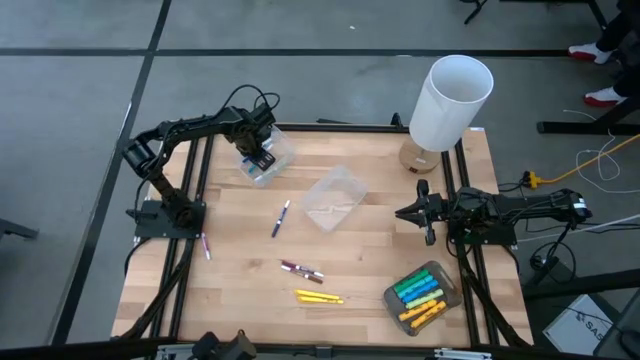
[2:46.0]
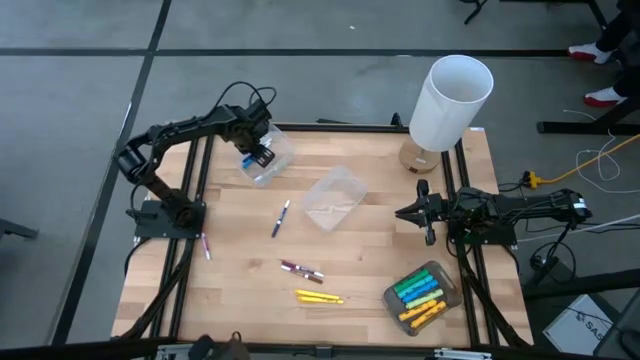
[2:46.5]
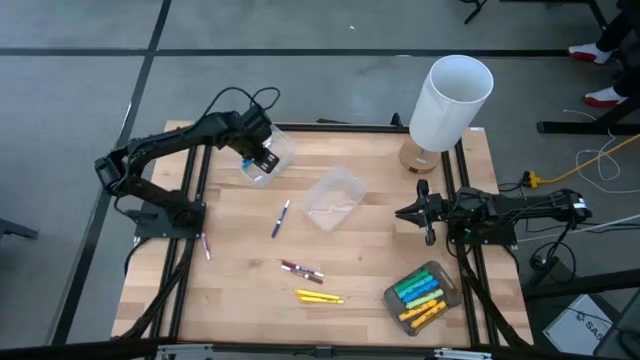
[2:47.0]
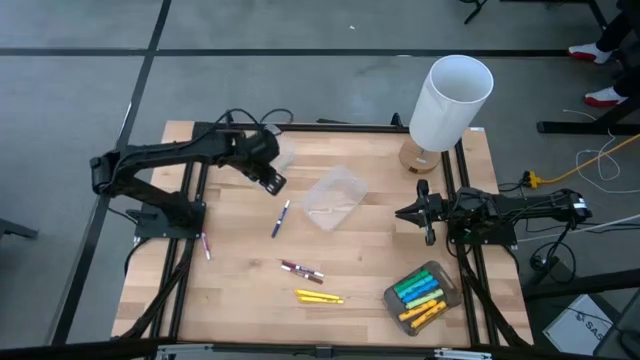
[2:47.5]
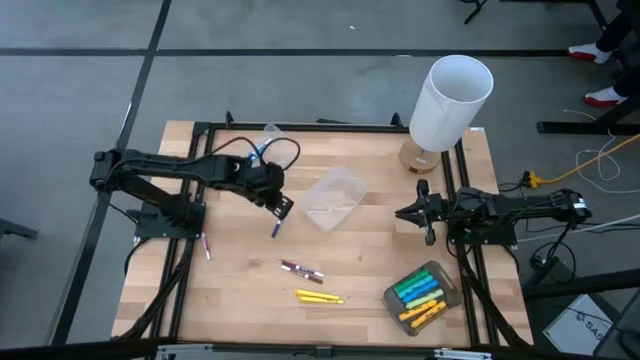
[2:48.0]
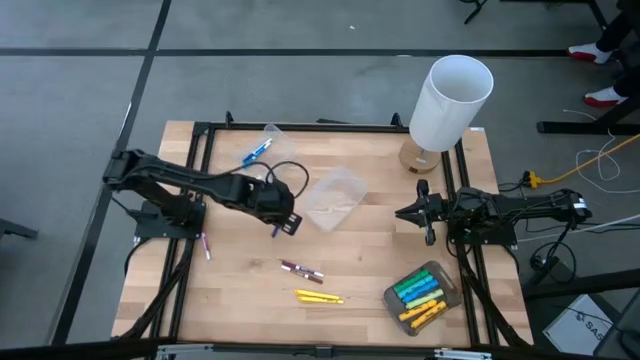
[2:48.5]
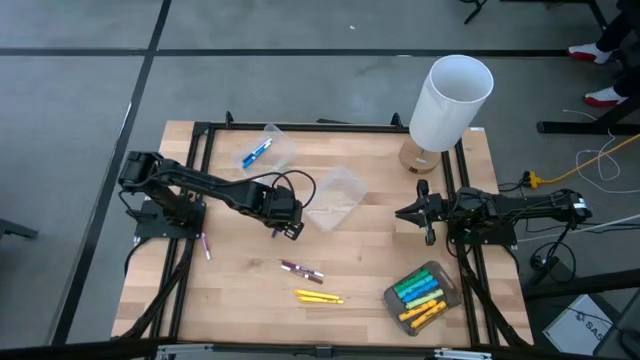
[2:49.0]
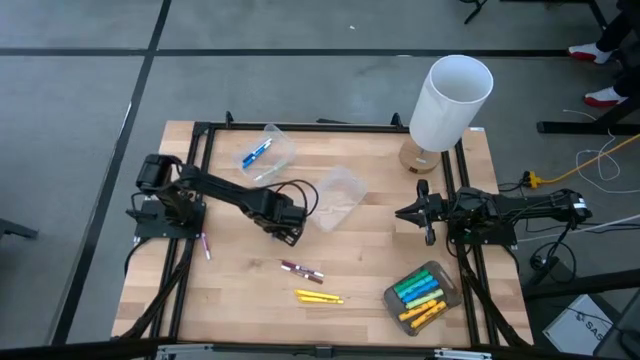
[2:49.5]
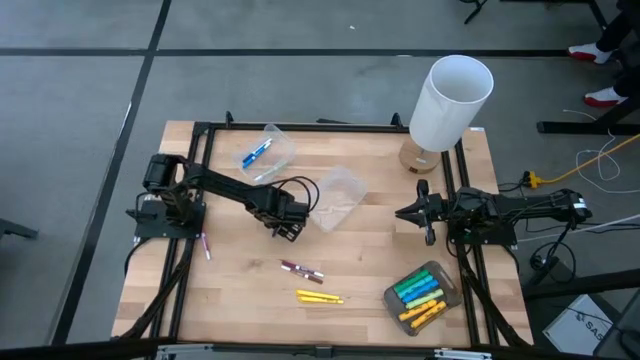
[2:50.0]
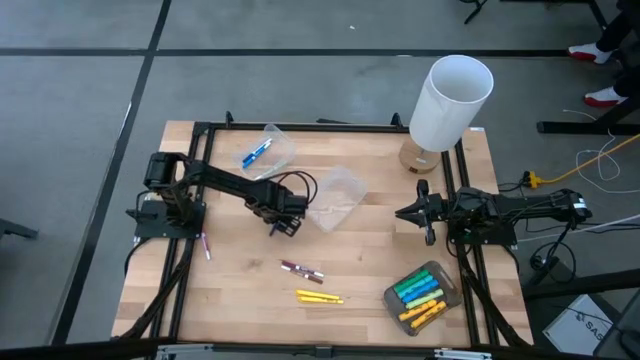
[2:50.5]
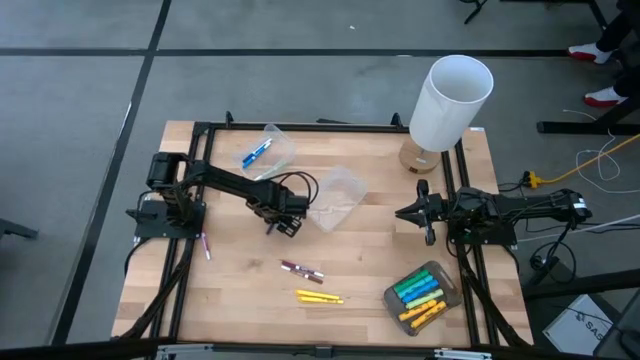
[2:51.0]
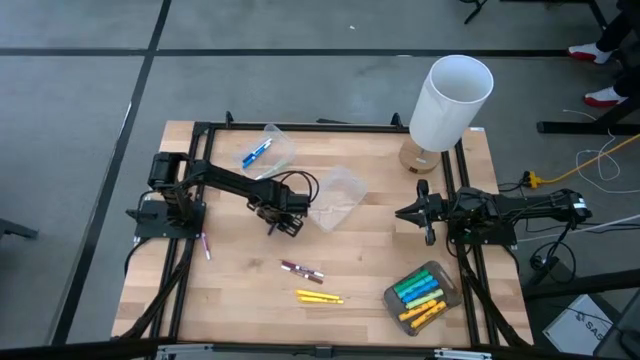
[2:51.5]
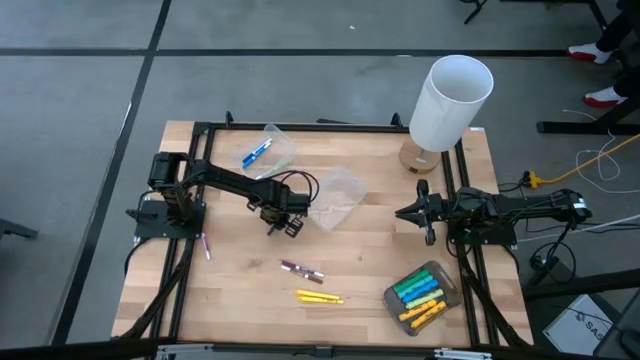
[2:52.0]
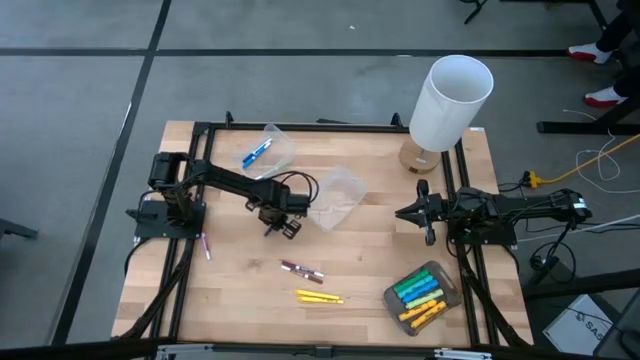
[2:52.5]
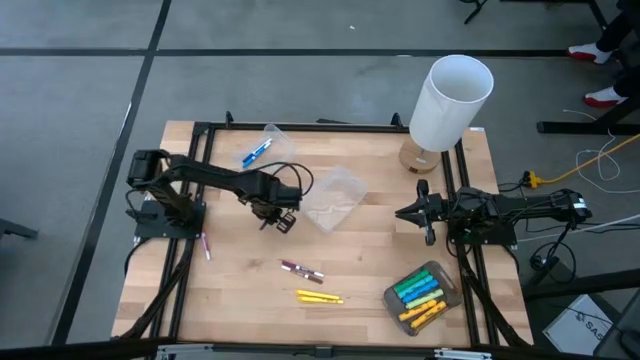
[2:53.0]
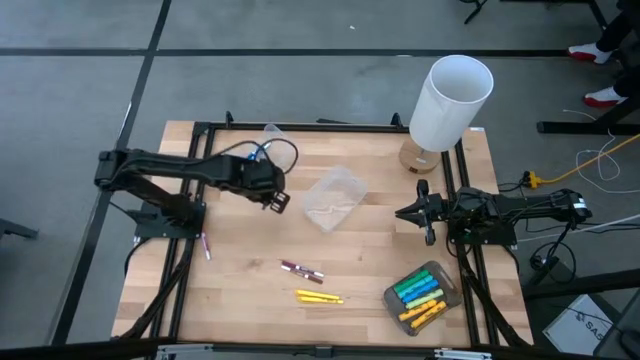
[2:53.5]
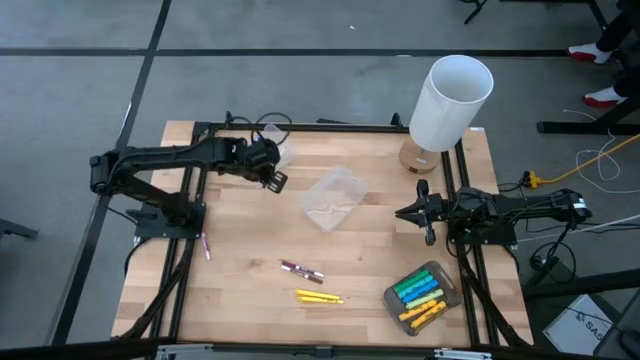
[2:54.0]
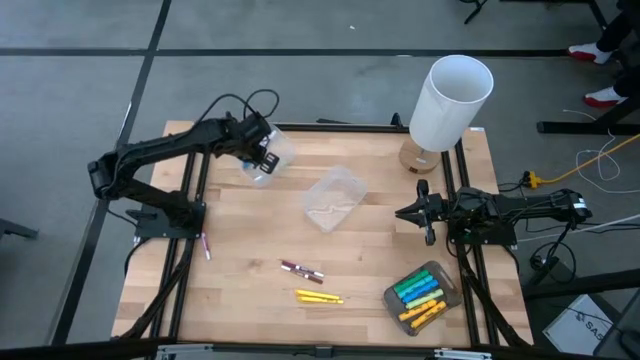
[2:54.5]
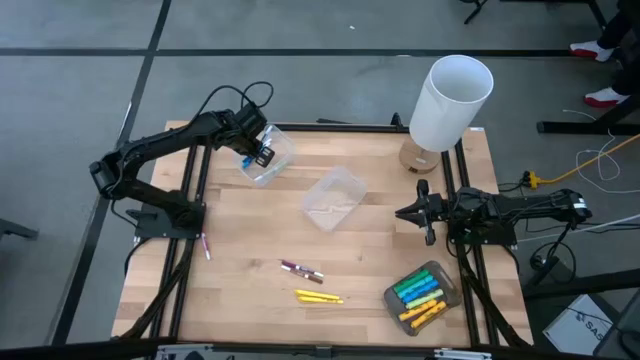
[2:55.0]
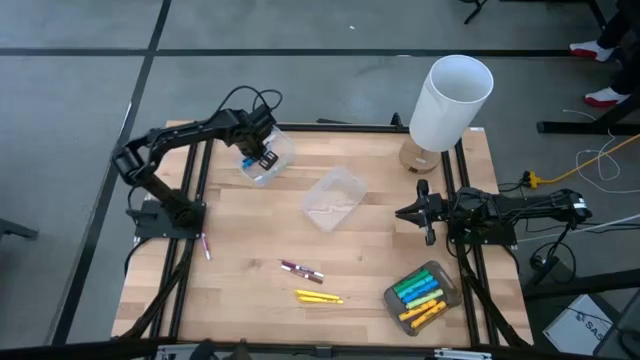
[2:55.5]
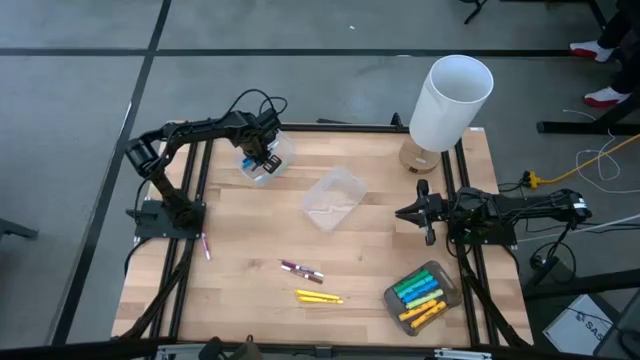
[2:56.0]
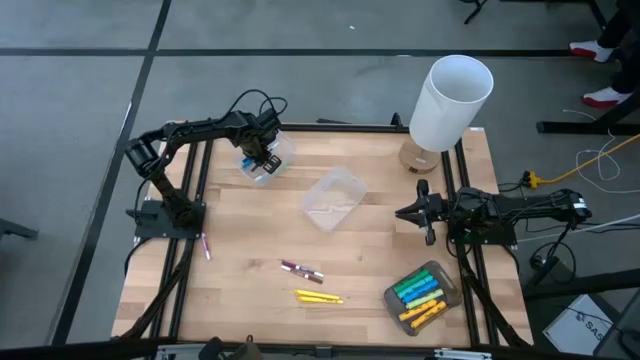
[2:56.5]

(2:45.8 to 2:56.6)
Task: Pick & Place Markers
Put the dark blue marker into the transparent bin

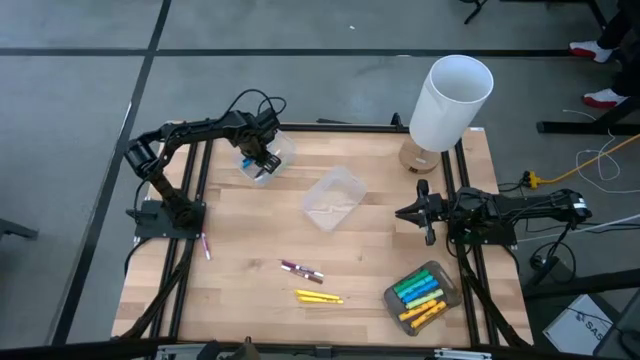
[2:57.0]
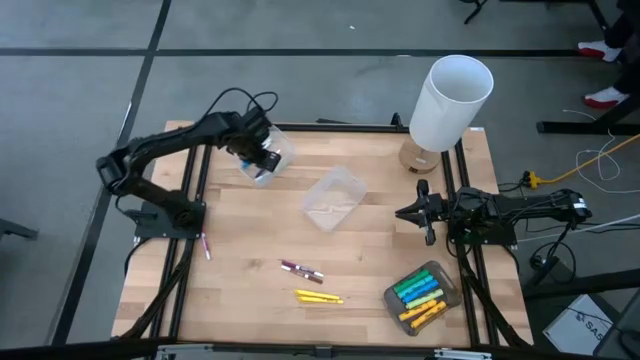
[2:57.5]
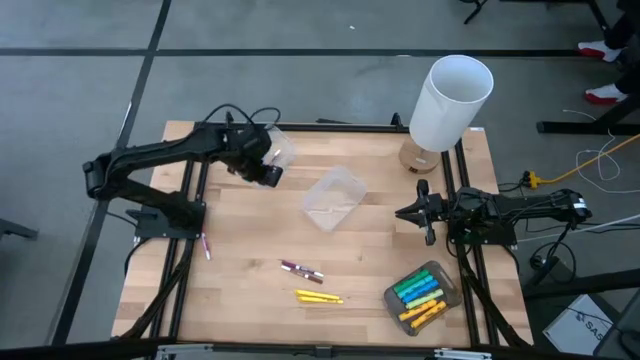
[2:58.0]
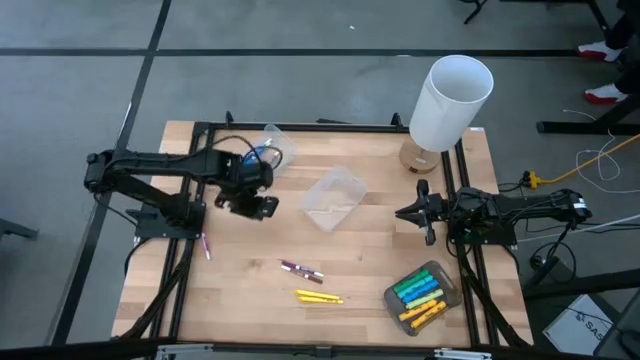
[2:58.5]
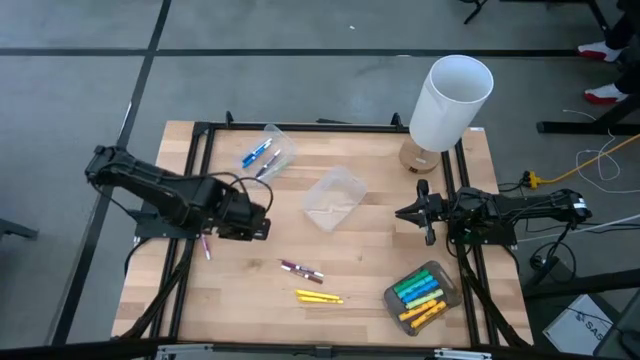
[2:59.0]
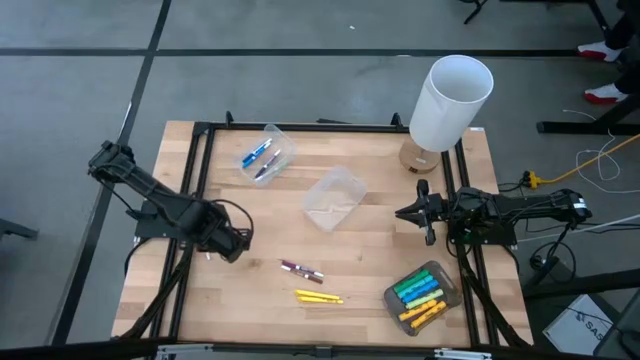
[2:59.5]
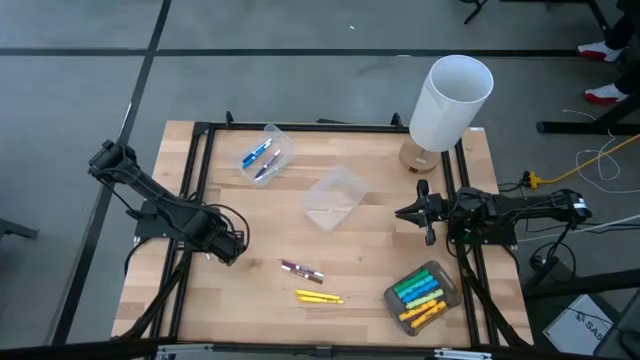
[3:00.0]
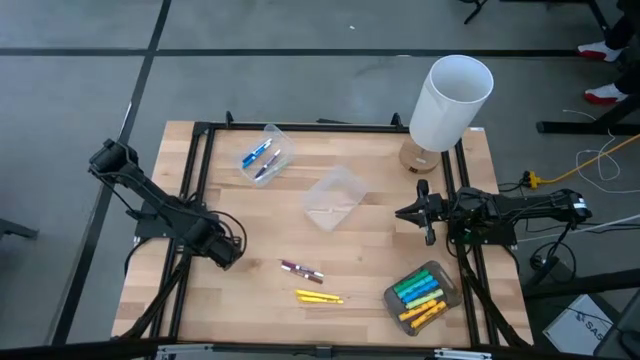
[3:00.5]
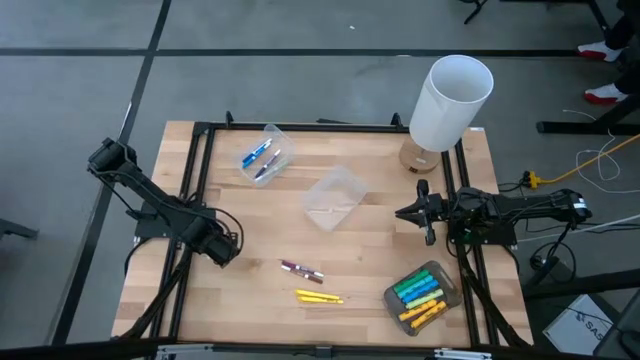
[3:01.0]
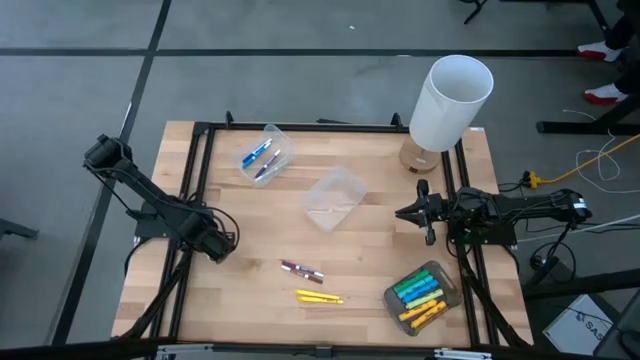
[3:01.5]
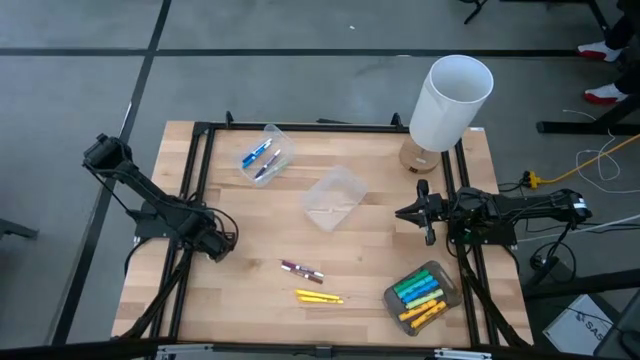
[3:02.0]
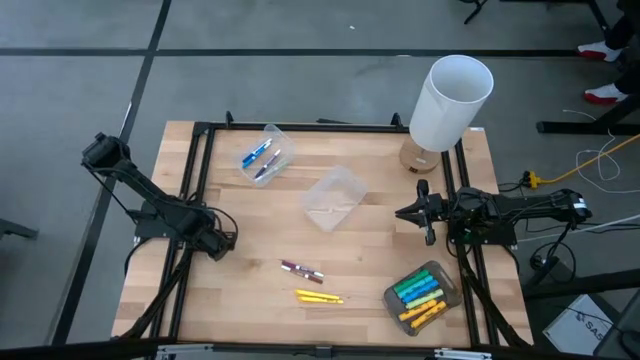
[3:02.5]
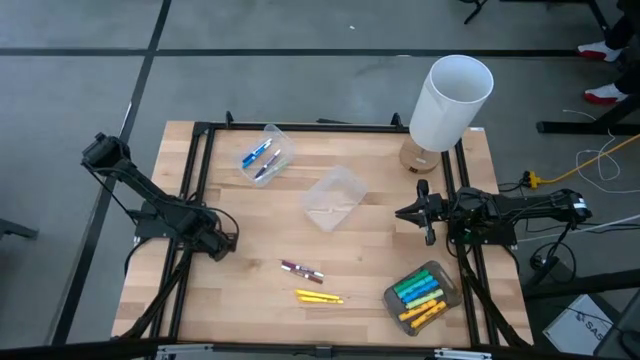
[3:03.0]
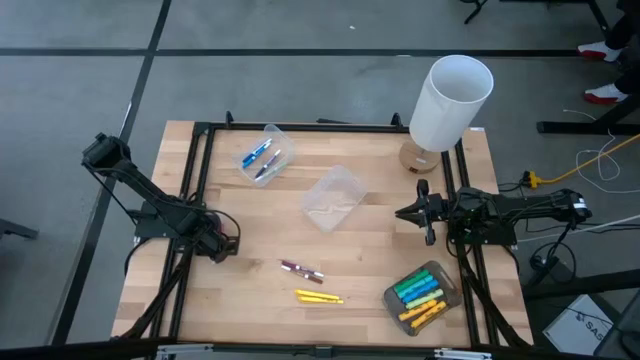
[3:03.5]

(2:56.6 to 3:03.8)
Put the pink marker into the transparent bin

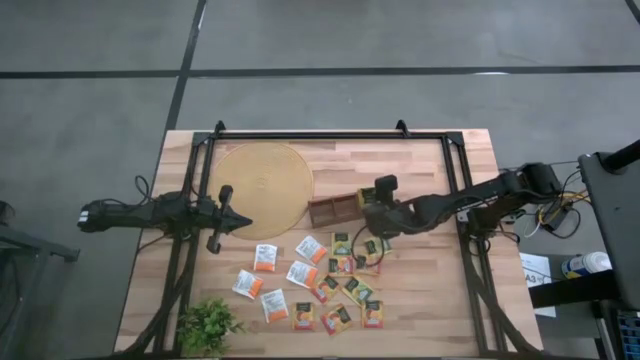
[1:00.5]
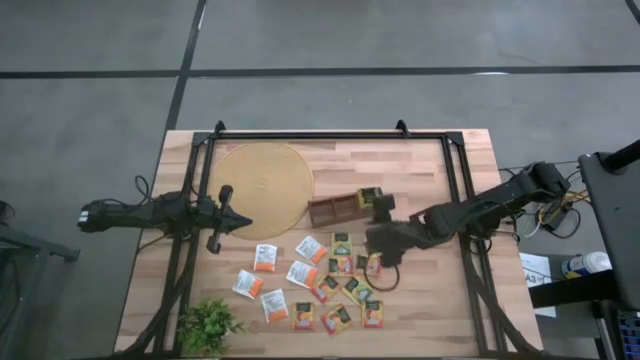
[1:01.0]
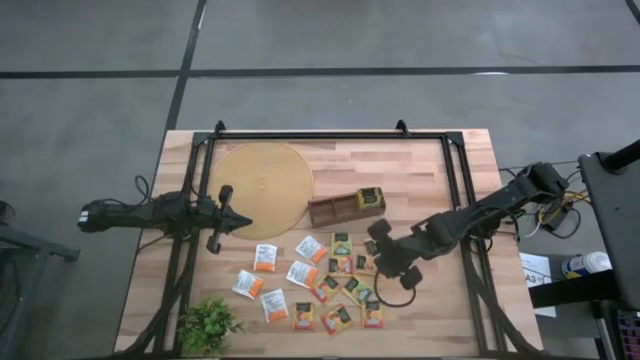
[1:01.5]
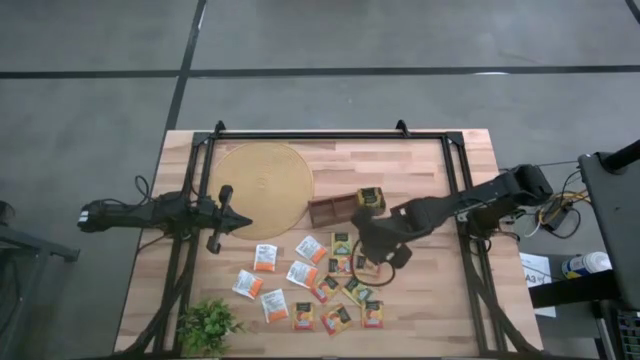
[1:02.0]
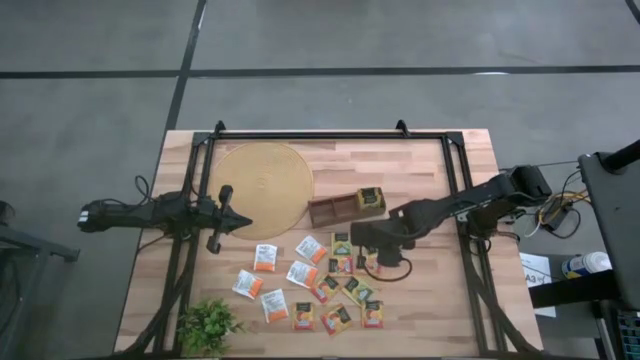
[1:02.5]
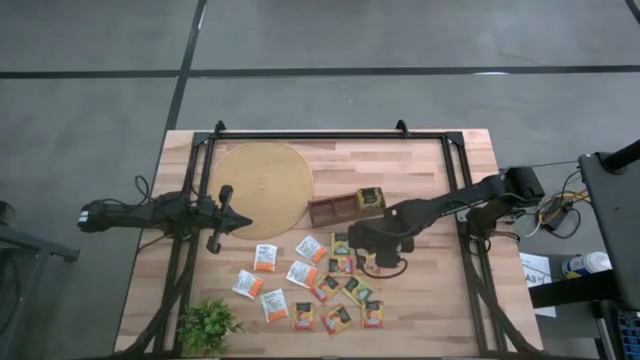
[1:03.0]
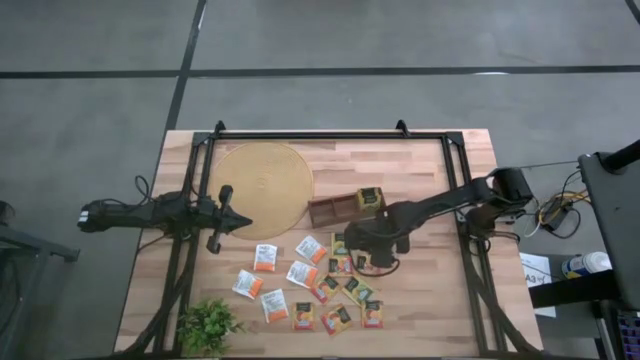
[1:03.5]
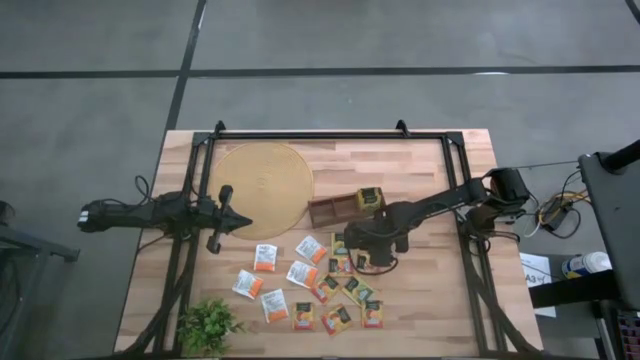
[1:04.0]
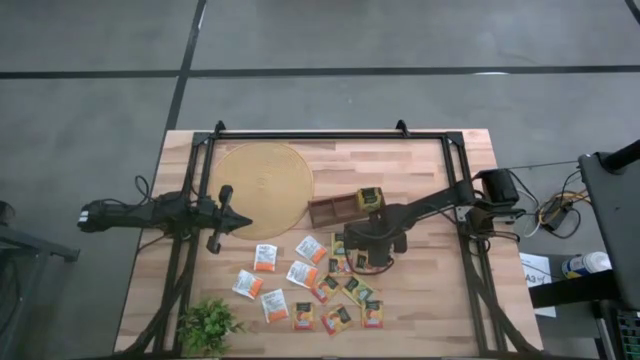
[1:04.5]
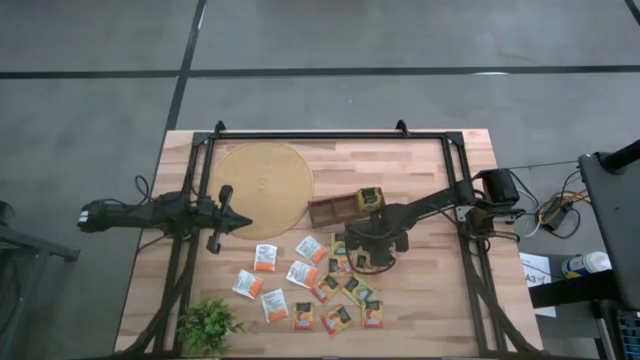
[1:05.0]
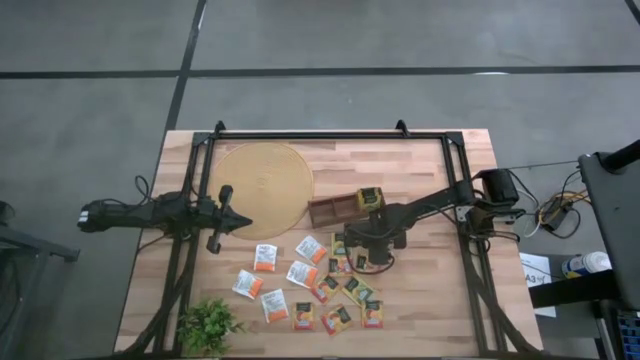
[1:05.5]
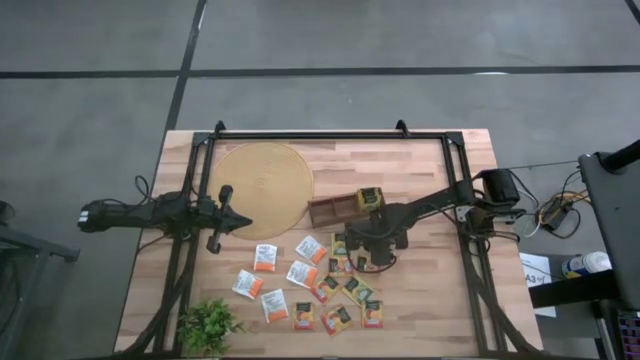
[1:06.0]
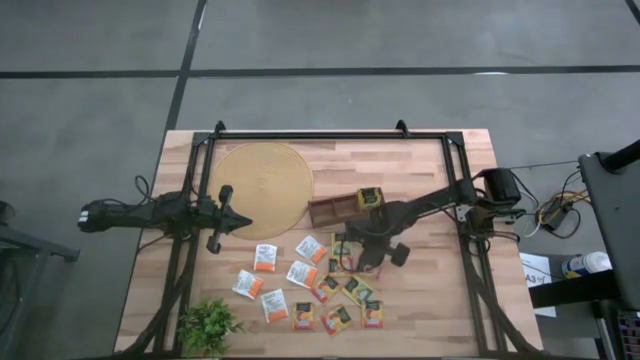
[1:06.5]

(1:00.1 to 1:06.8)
Task: Pick & Place Tea
Put the yellow tea bag into the right section of the wooden organizer
